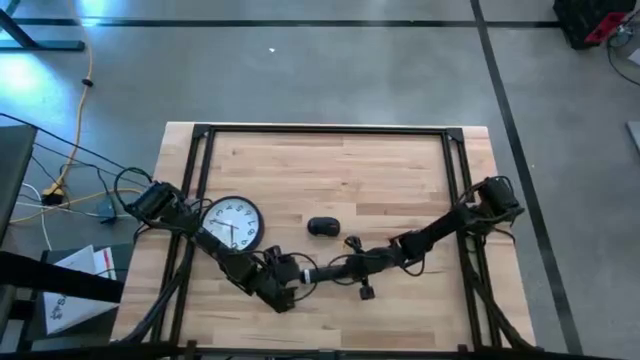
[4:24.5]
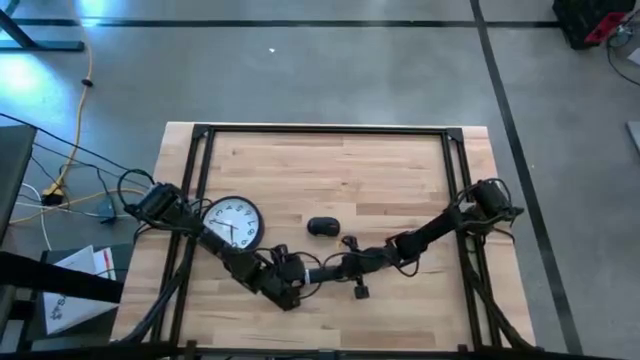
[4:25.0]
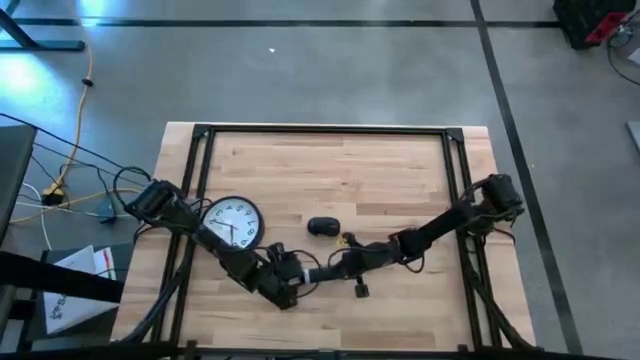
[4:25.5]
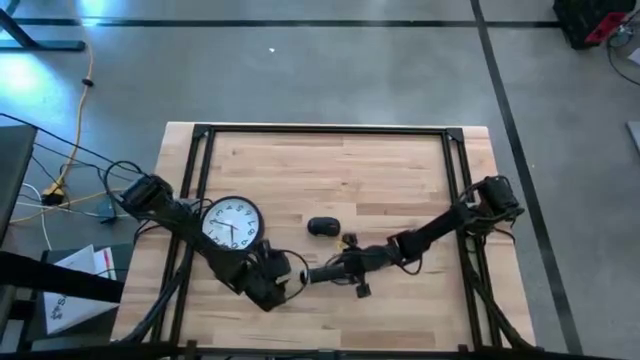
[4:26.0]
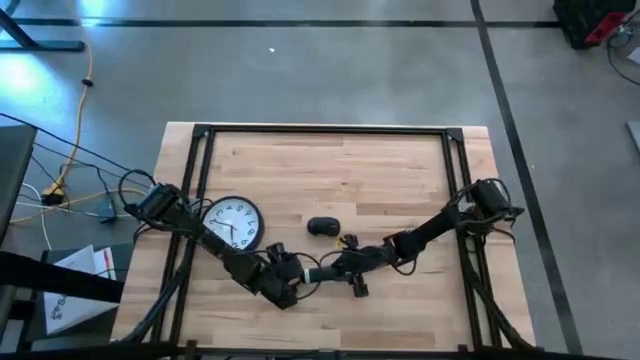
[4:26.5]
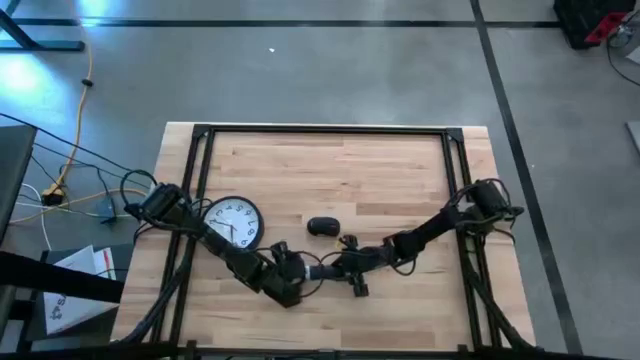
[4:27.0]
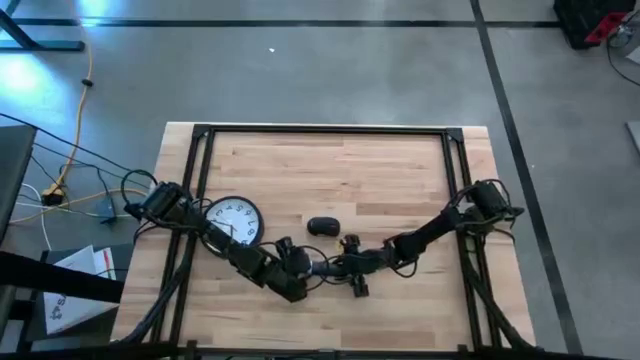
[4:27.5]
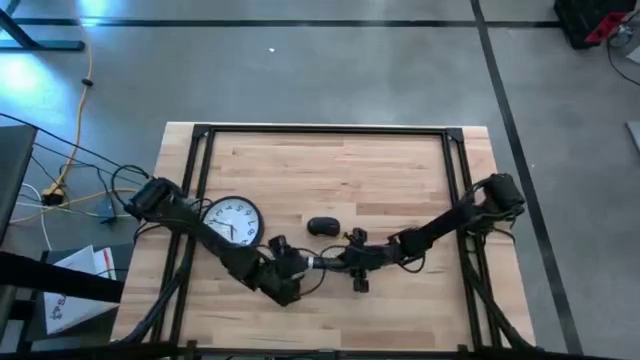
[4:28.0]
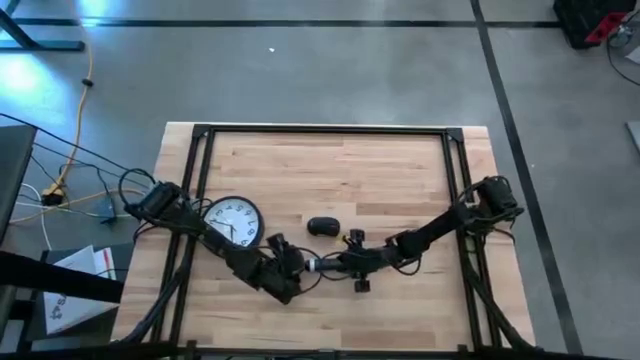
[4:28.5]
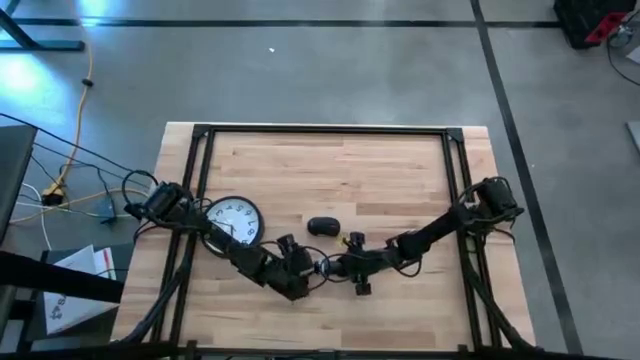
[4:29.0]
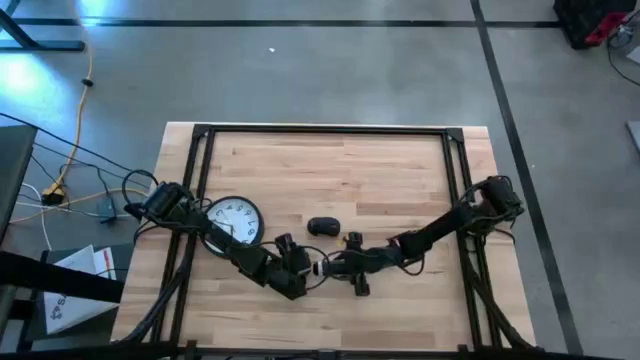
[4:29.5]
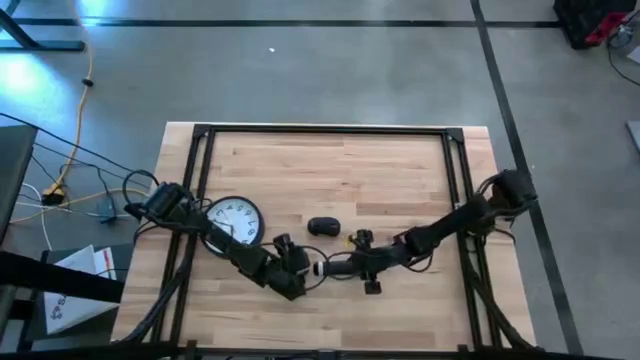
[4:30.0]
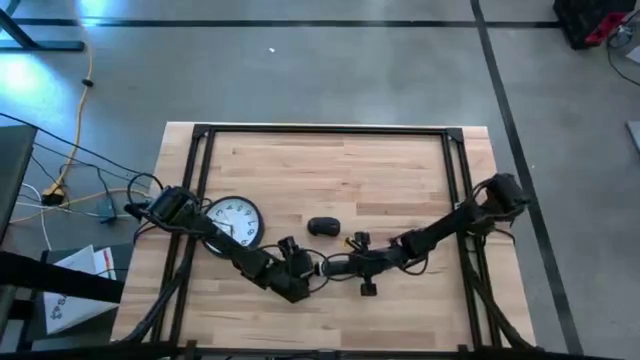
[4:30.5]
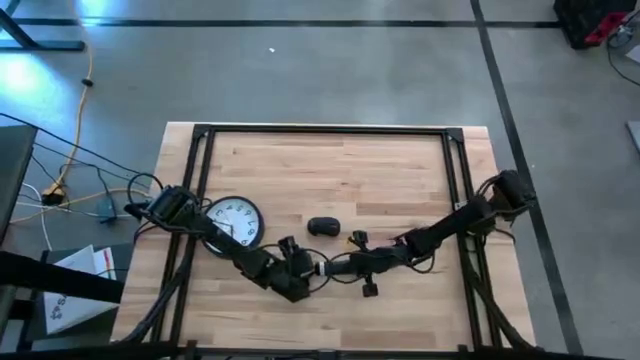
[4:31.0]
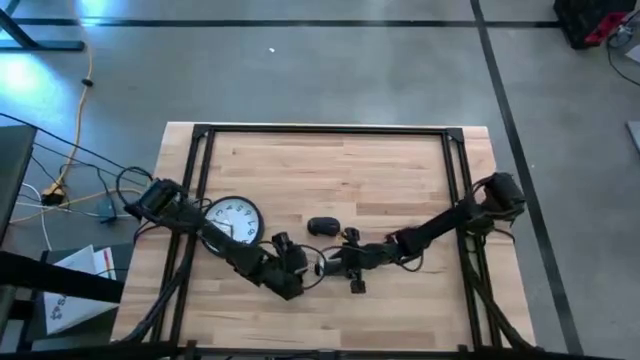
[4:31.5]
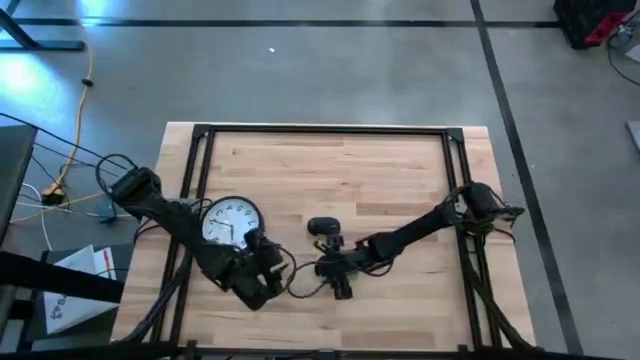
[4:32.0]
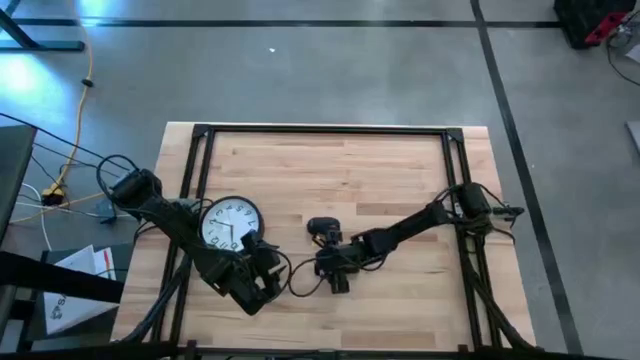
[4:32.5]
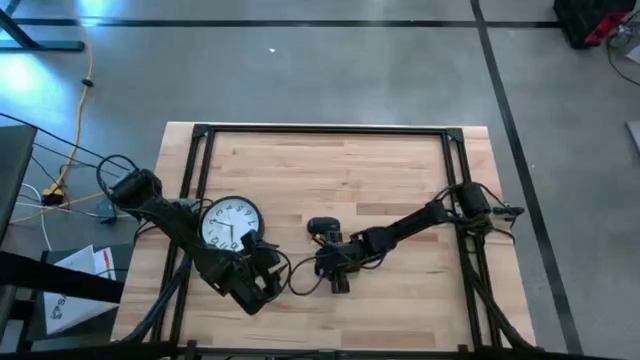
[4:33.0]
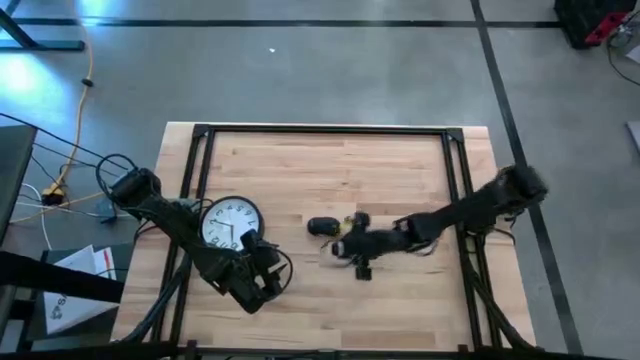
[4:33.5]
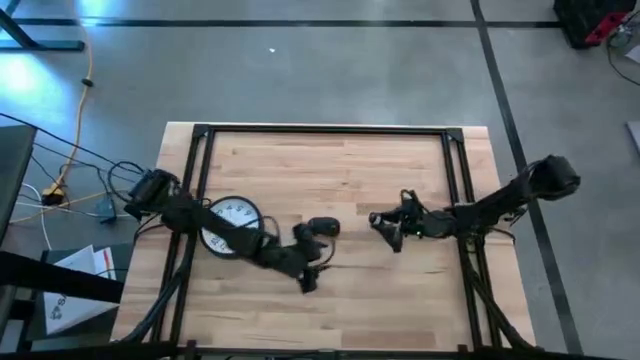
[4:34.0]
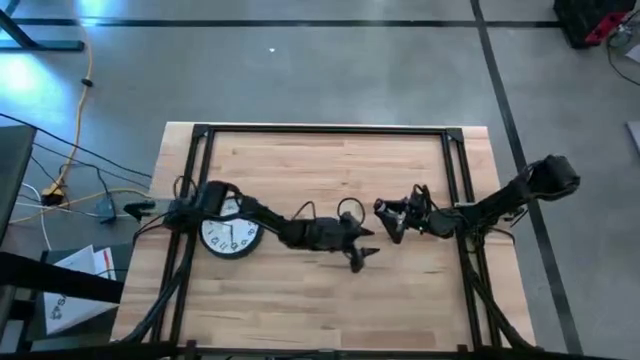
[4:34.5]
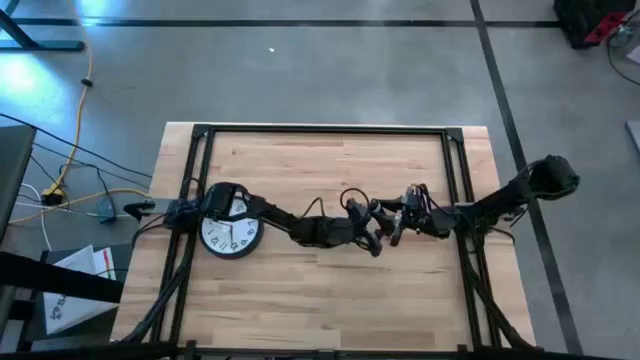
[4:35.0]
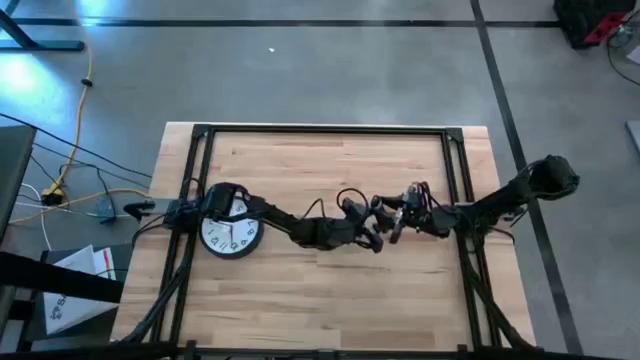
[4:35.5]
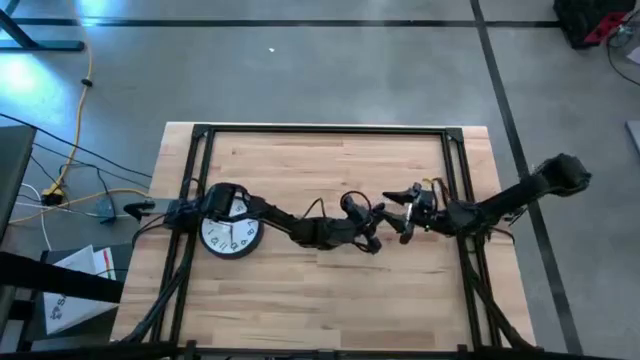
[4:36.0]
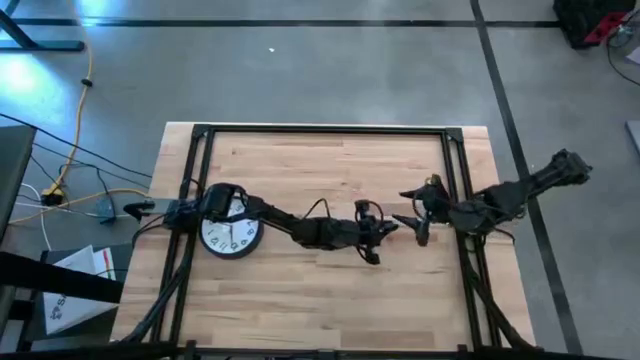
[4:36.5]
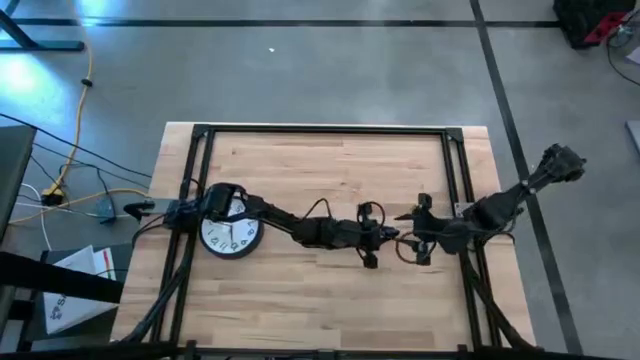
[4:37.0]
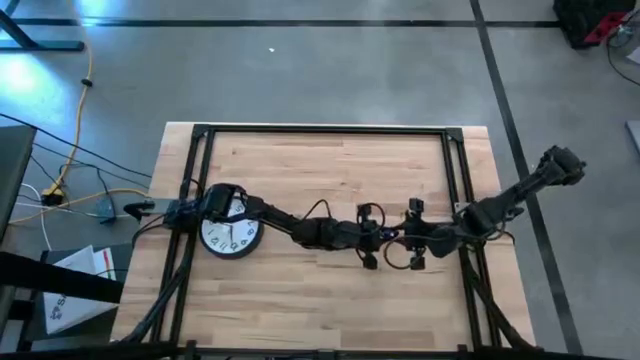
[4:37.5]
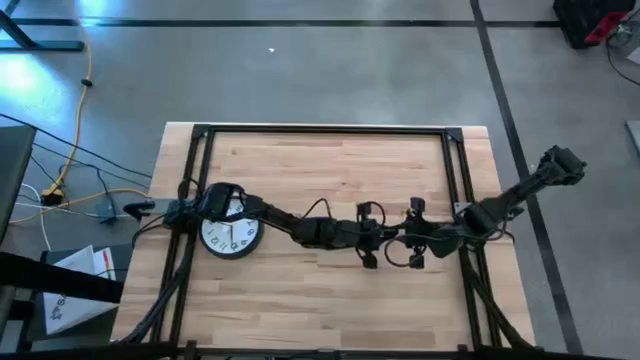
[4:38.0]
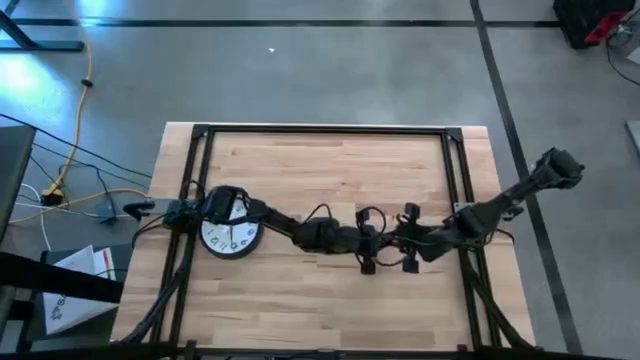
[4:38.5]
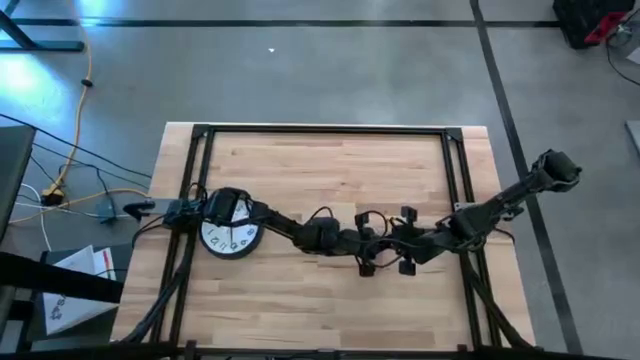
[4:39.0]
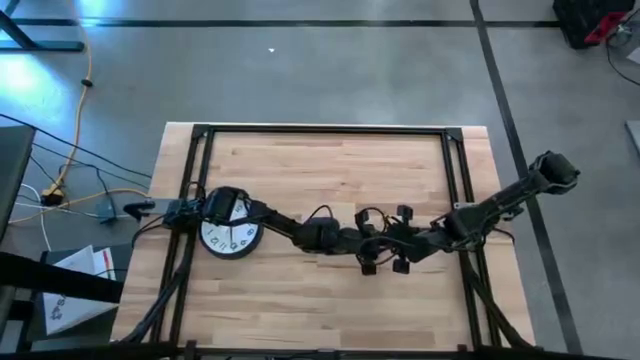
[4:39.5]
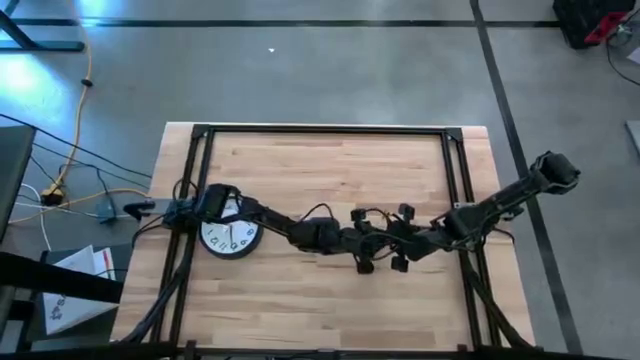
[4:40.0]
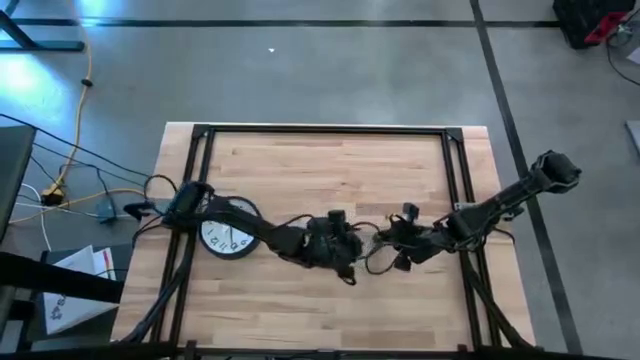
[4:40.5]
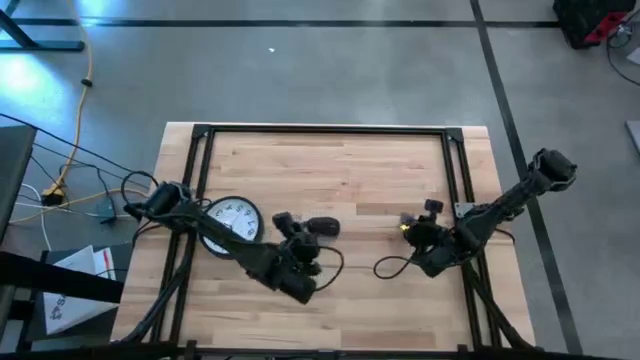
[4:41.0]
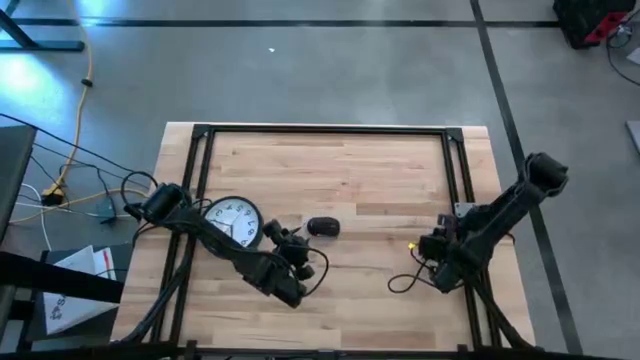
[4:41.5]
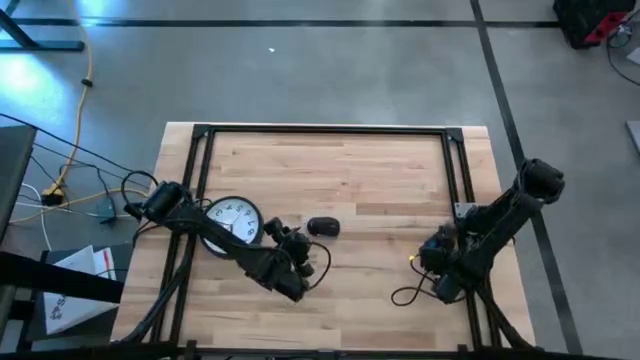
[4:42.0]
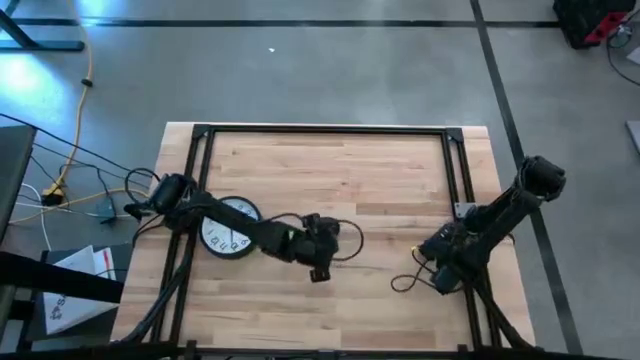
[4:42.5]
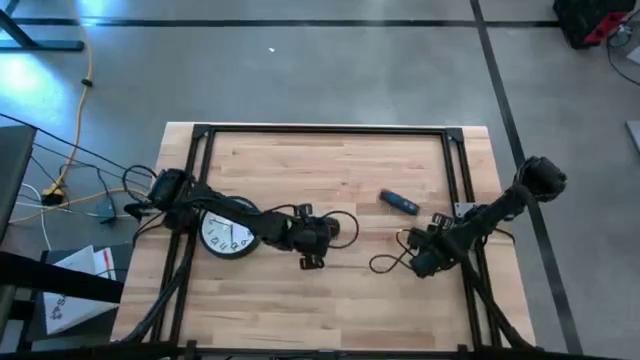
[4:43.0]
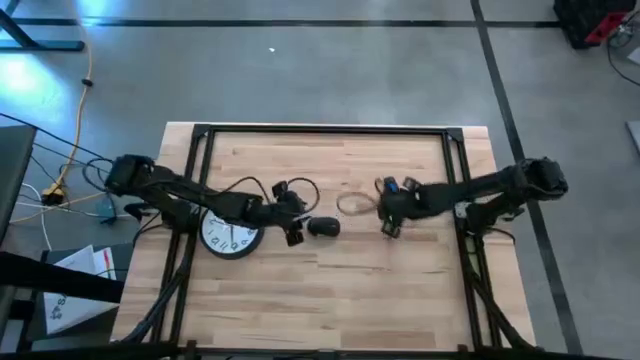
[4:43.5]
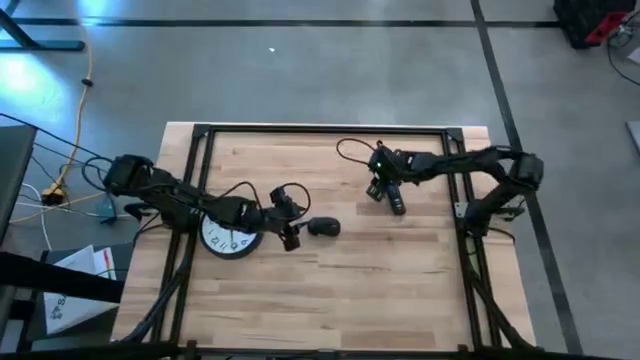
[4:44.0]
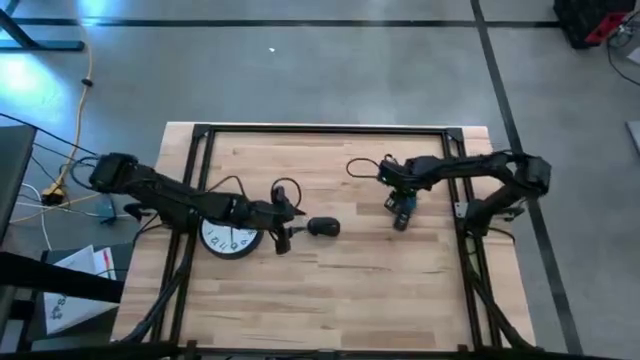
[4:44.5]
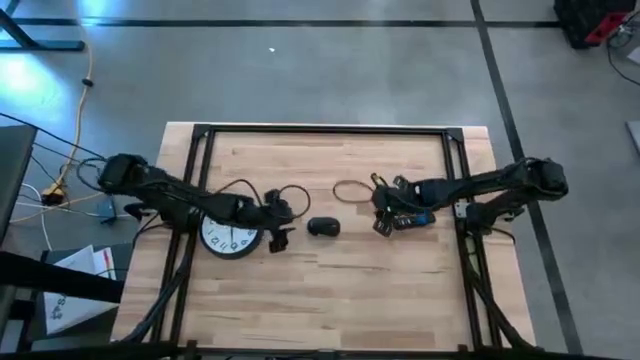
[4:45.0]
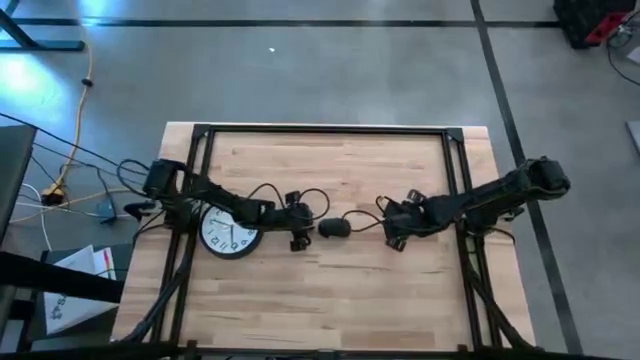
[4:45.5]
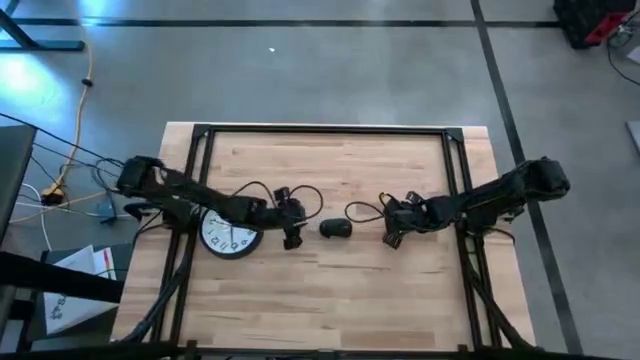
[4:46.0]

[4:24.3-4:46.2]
Task: Insert battery
Close the black remote battery compartment

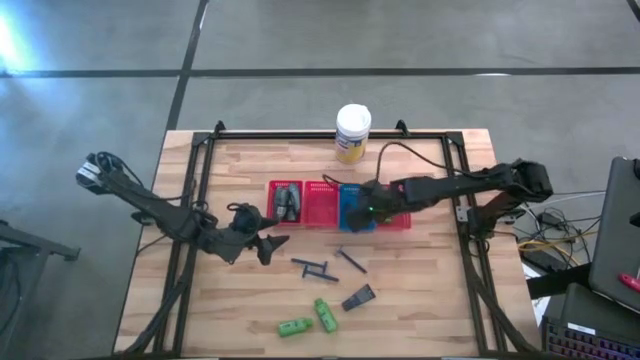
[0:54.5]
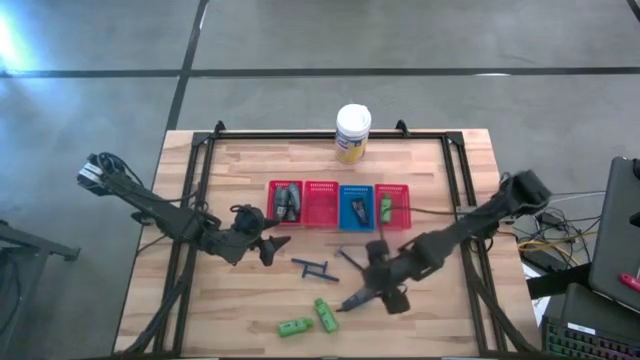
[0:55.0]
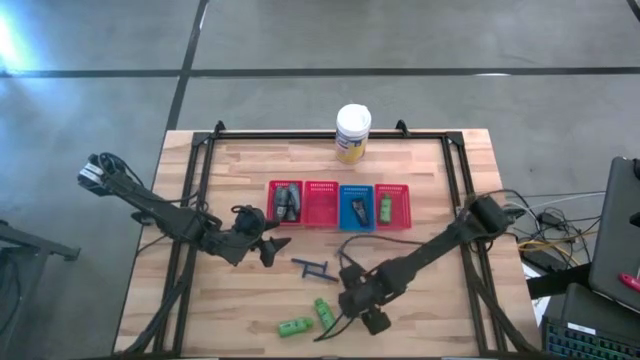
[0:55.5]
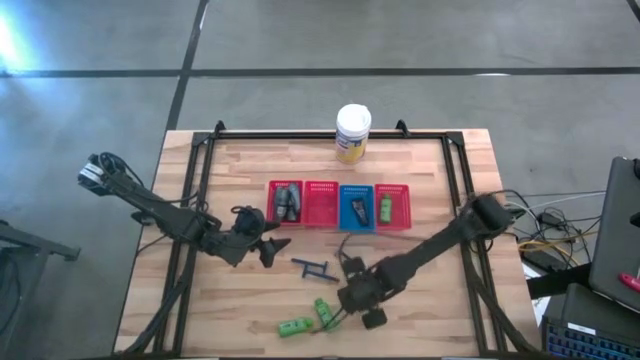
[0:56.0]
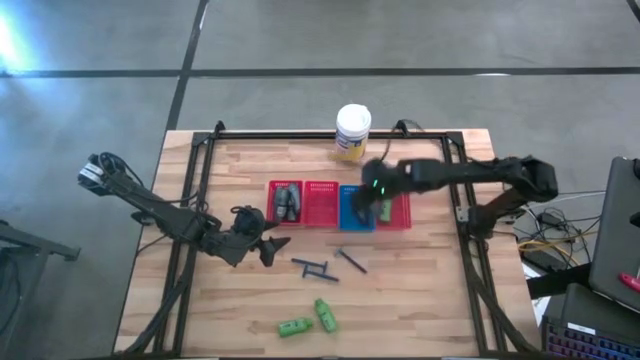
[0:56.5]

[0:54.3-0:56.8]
Task: Pick & Place Travel size toiletries
Put the blue shave cream into the blue bin
